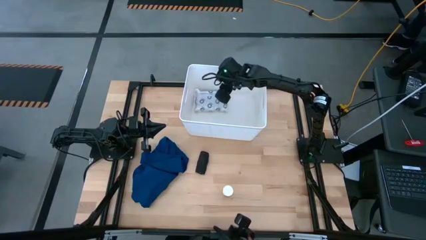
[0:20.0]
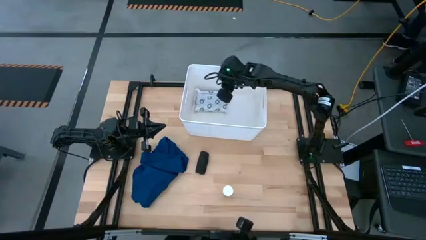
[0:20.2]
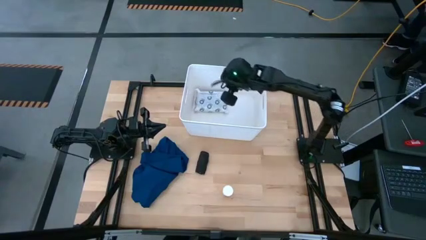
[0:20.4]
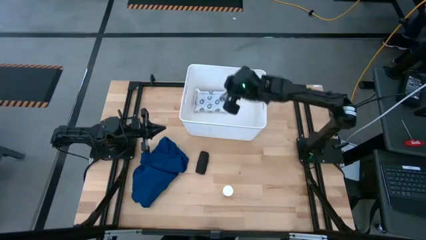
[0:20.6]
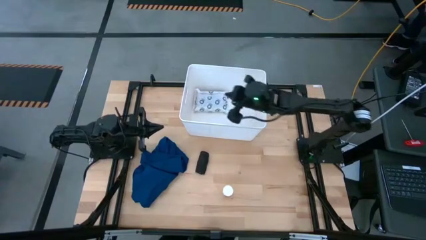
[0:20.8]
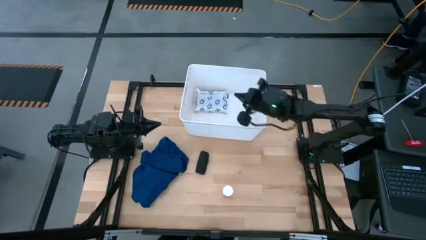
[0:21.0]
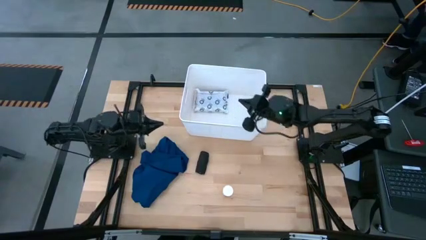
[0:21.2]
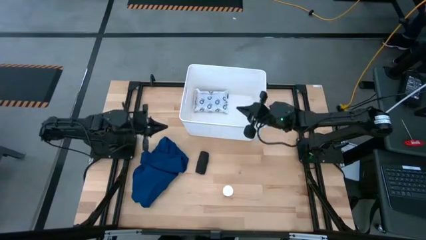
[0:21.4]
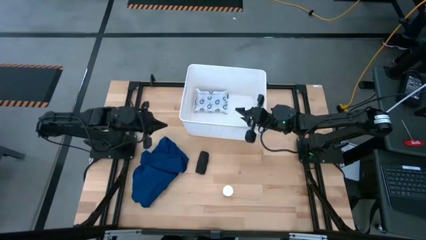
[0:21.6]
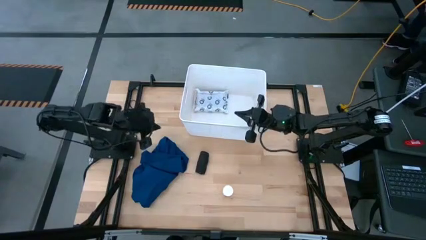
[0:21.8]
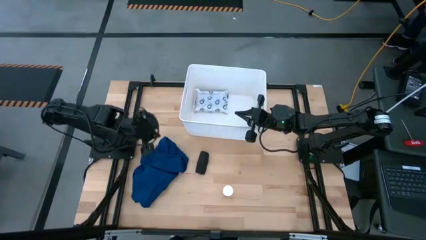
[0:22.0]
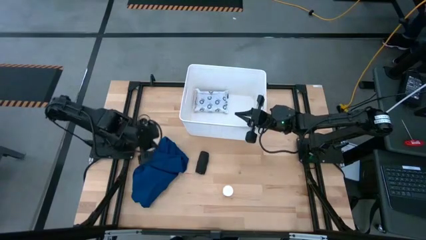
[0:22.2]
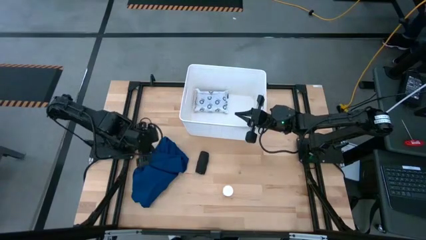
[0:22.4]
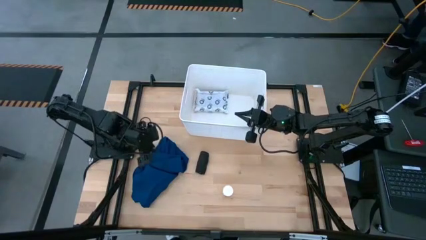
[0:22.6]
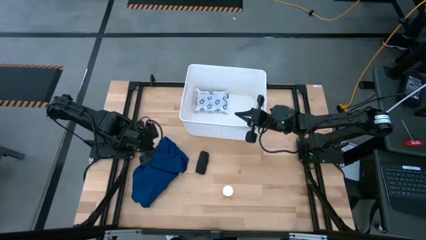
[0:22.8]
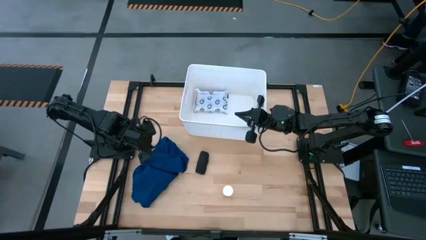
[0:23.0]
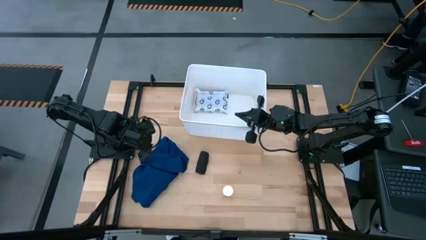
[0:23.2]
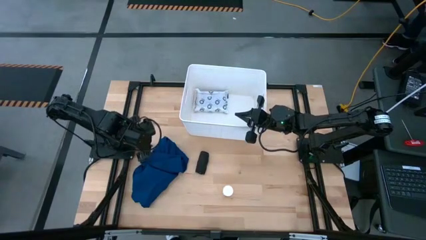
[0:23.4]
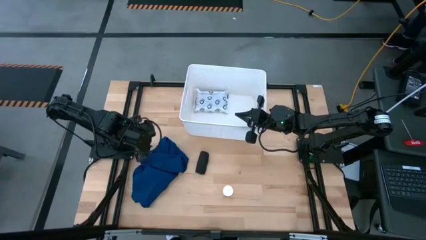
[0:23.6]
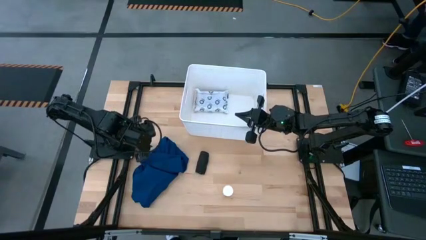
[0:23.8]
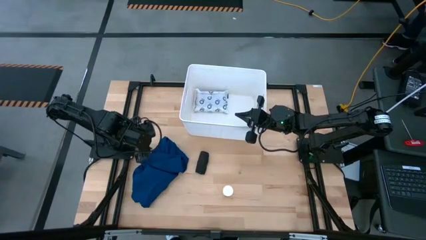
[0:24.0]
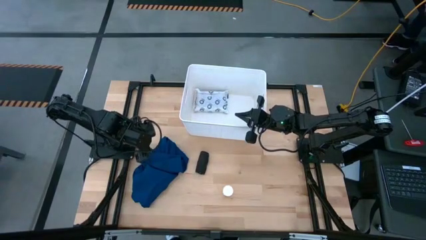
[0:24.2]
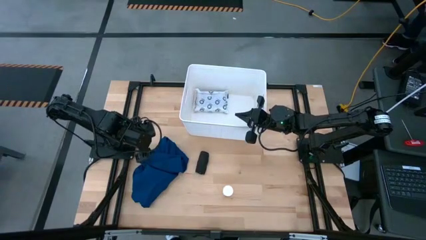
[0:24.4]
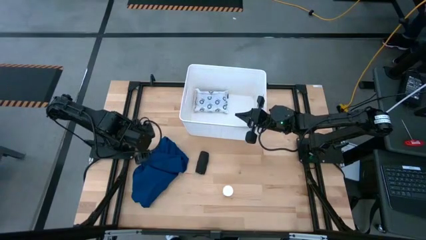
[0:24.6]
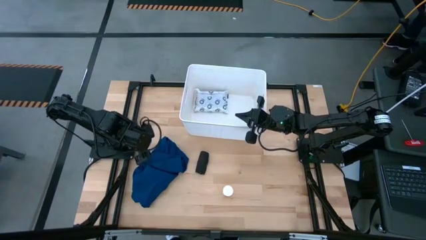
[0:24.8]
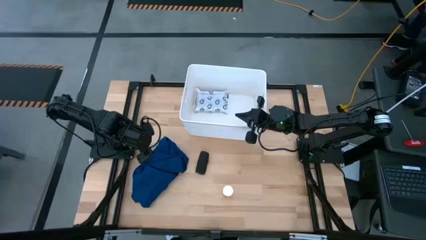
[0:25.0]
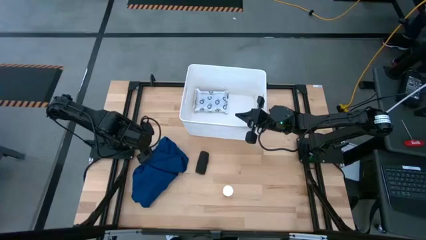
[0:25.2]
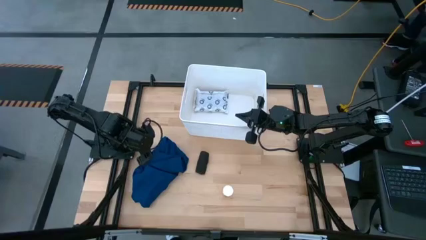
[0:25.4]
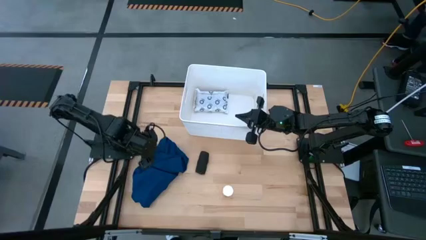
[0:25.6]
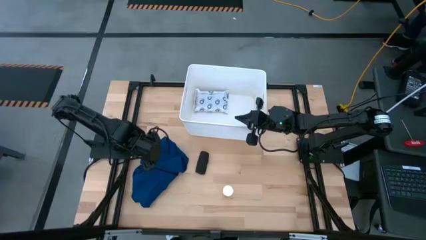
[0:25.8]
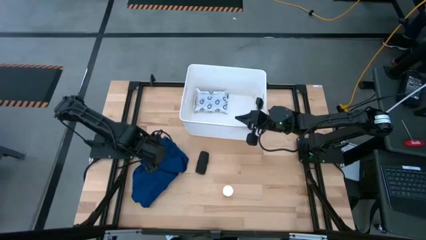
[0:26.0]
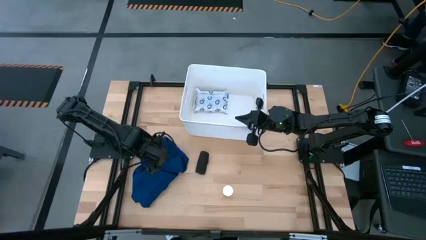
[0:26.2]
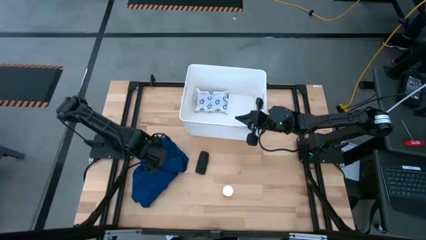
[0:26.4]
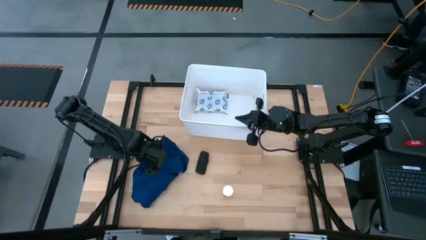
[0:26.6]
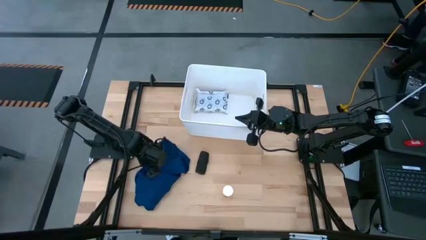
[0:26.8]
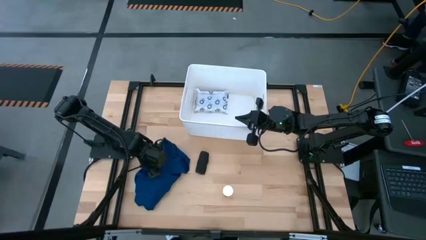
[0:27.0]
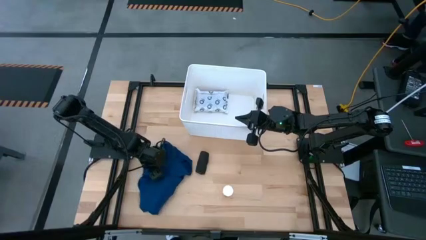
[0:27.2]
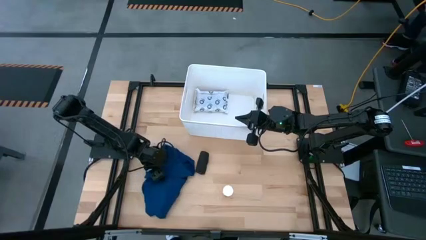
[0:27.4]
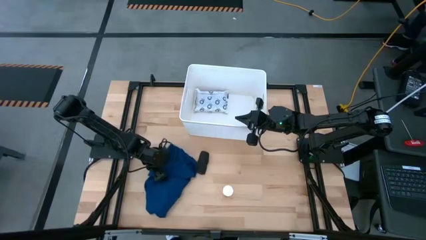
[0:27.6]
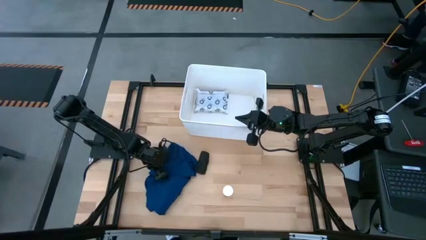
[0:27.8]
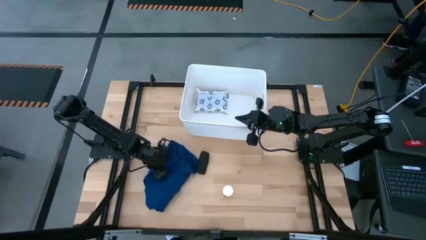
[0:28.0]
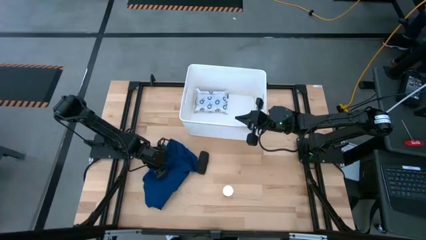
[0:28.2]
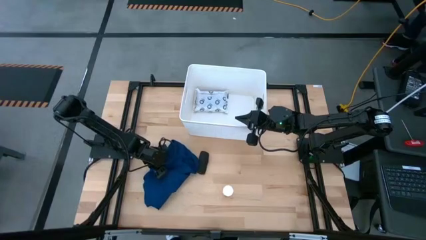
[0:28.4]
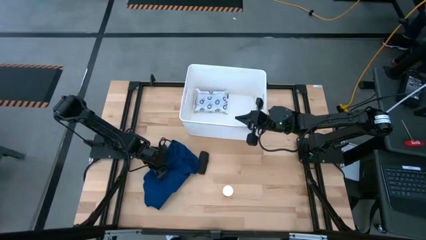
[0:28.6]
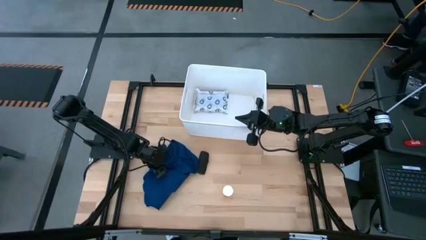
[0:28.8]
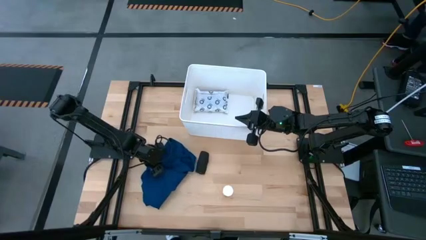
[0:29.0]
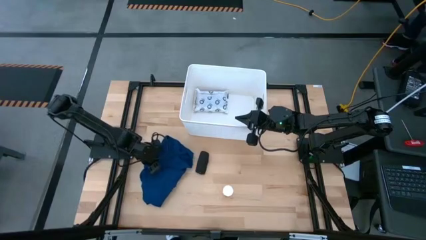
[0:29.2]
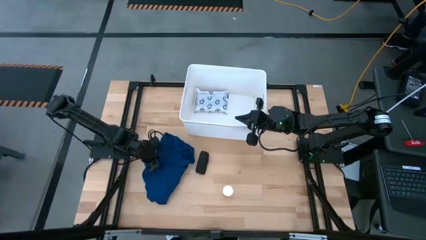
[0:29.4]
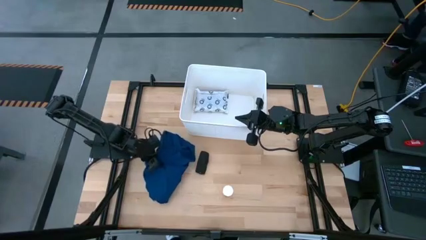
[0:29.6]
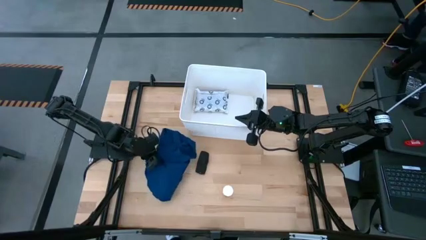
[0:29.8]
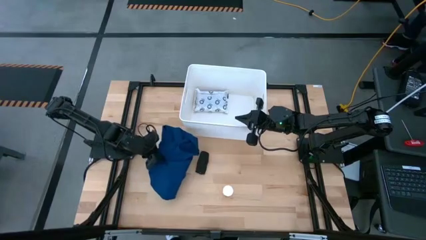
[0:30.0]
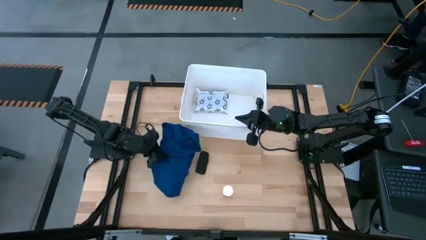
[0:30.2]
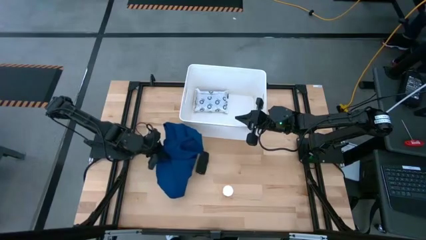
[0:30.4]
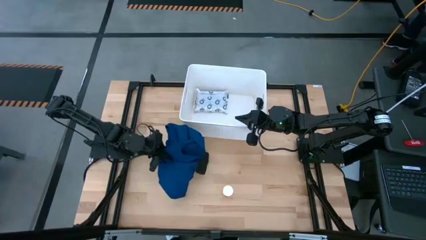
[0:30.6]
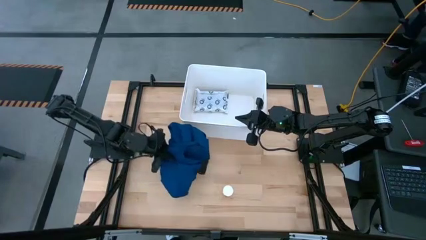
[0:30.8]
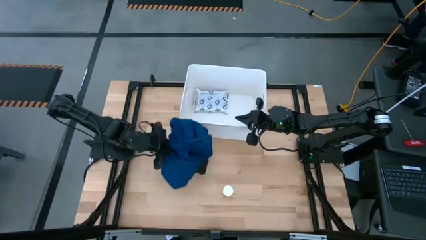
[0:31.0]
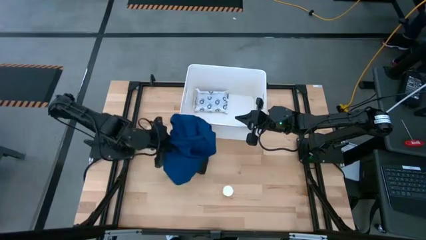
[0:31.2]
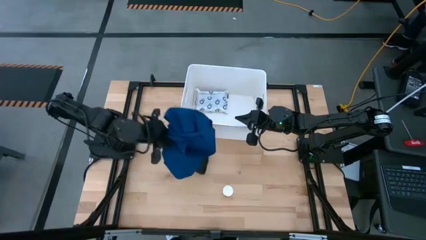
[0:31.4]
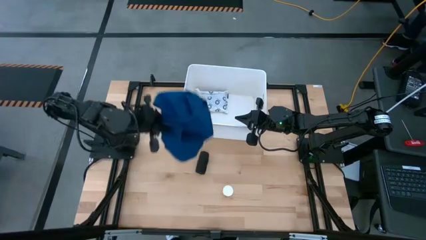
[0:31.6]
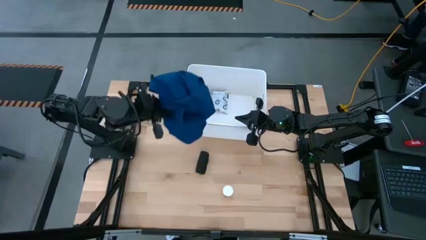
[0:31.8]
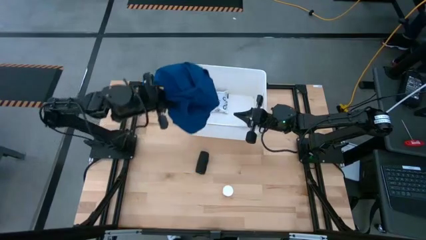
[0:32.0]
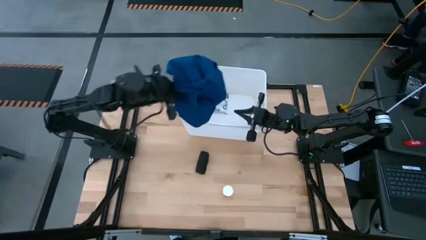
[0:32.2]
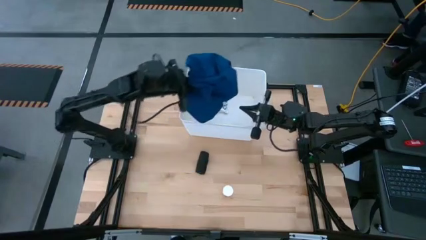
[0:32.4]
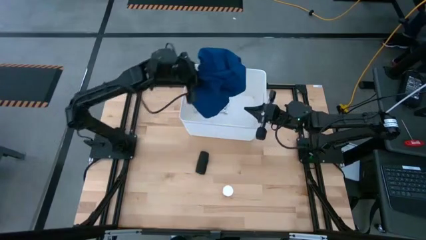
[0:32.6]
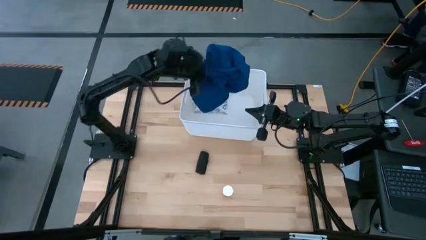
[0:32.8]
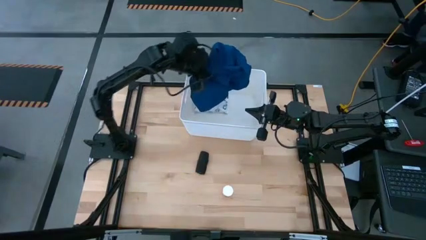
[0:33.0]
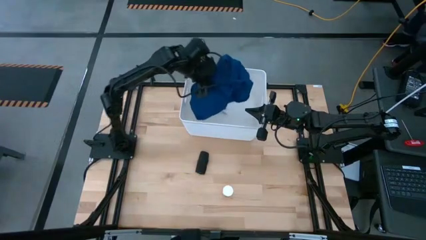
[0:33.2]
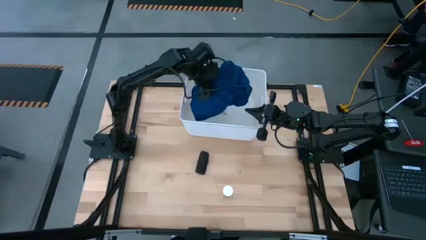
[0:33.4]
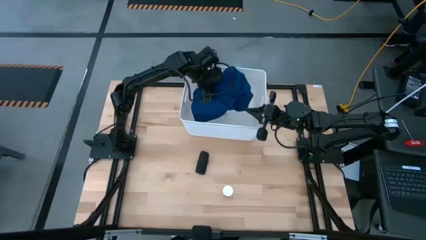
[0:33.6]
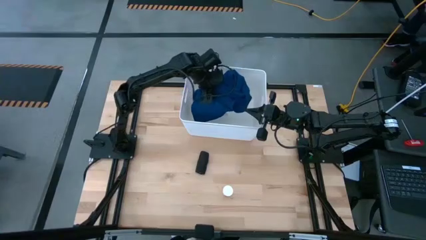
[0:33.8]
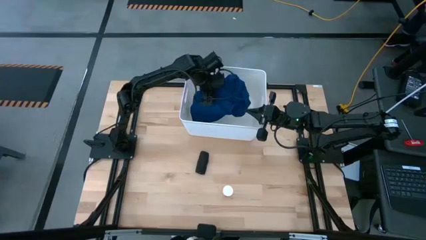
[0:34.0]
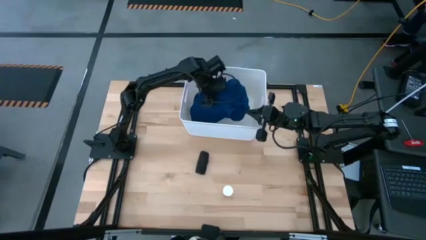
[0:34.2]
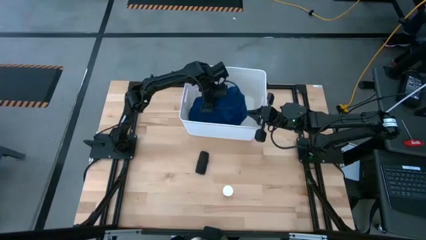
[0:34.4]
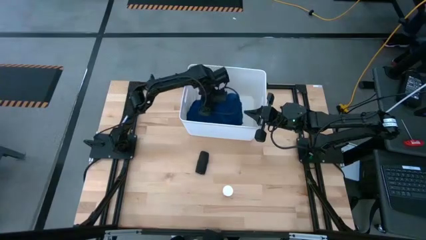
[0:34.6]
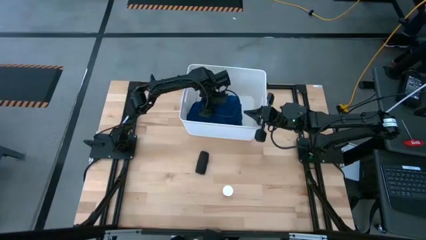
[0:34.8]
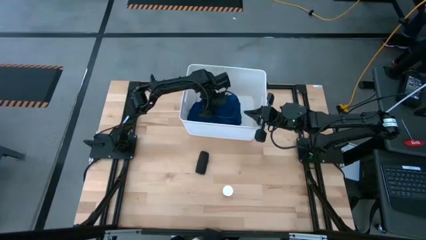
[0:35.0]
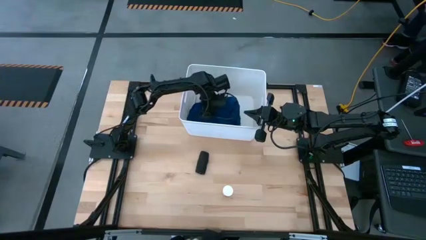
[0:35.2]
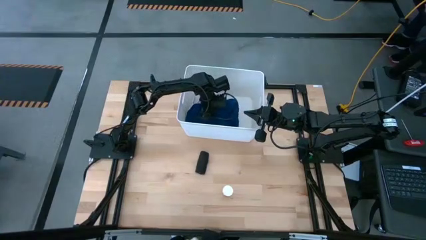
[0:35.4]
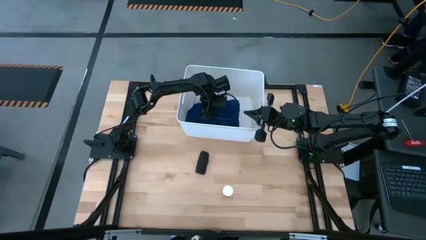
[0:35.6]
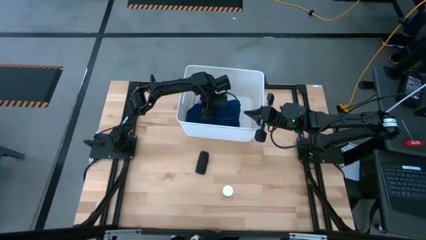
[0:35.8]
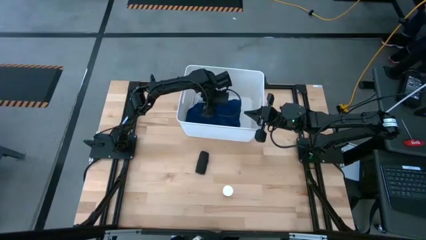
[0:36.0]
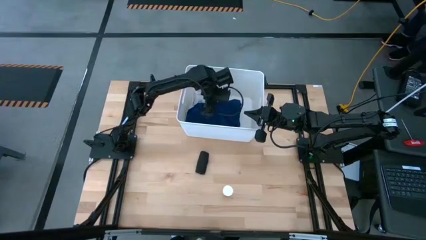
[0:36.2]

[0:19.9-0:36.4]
Task: Pick & place medical supplies in basket/bin
Put the blue cloth into the white bin
